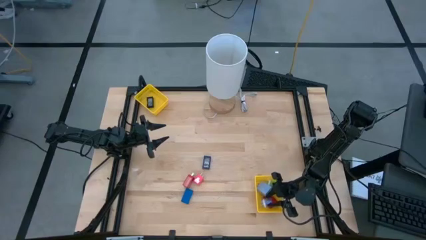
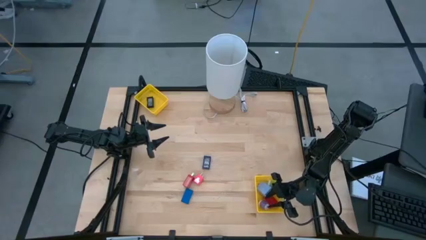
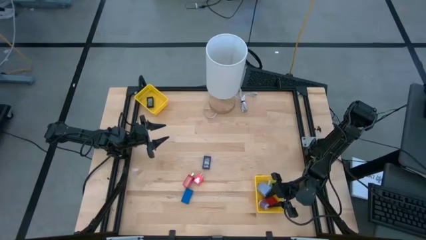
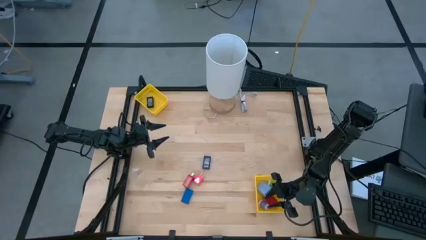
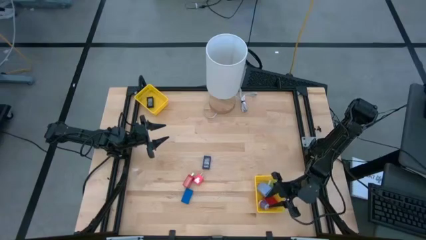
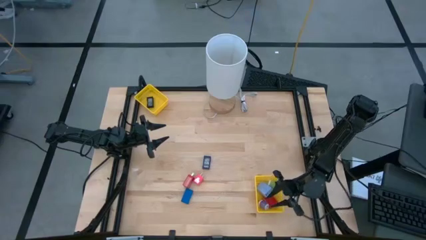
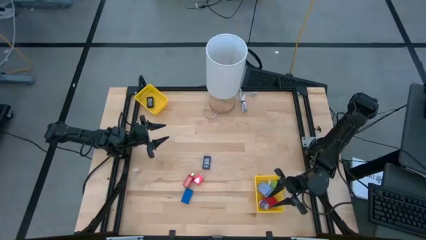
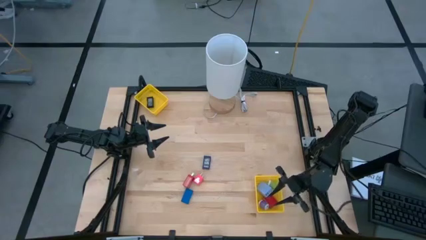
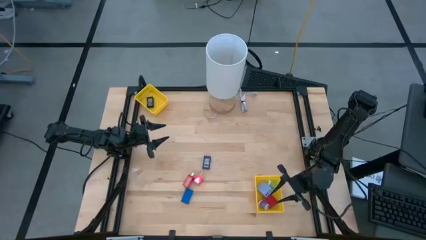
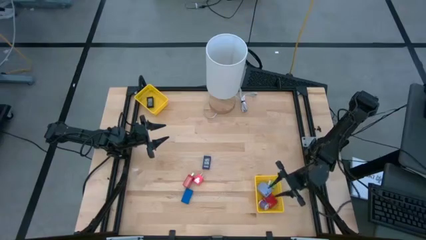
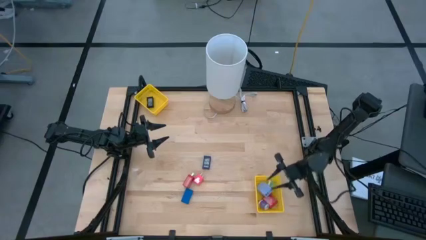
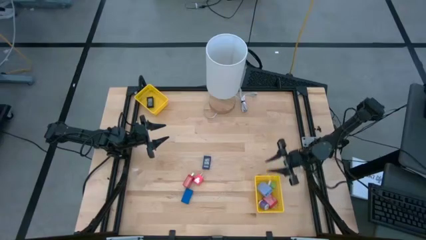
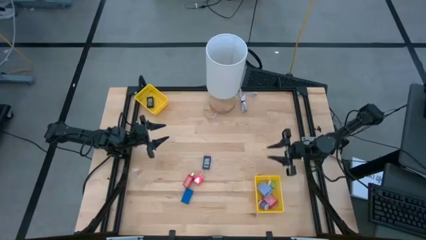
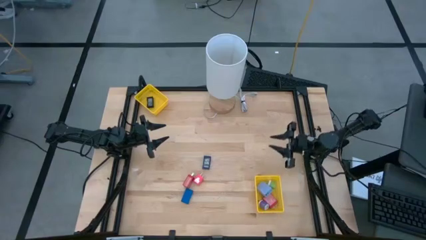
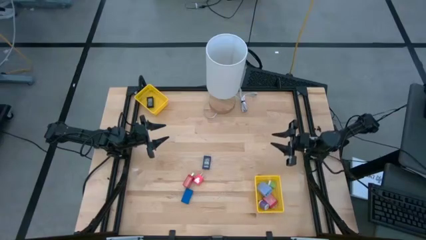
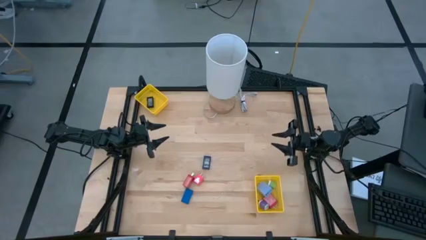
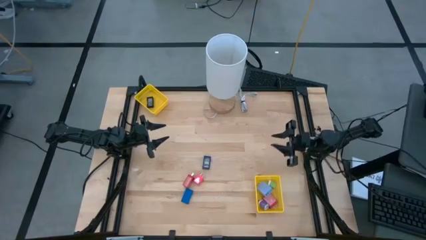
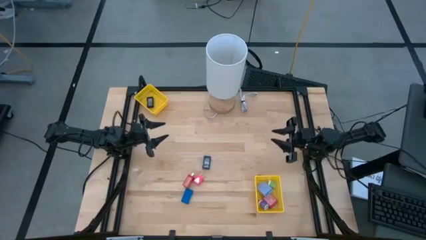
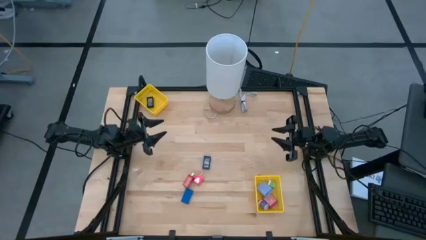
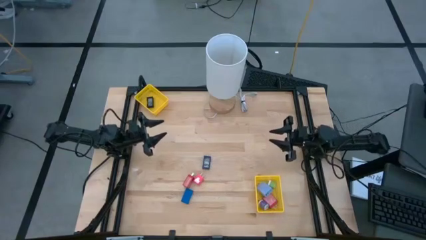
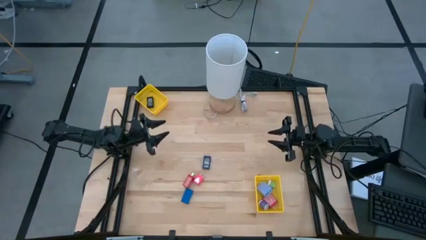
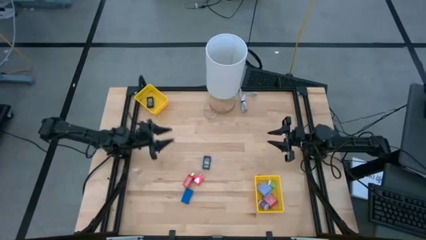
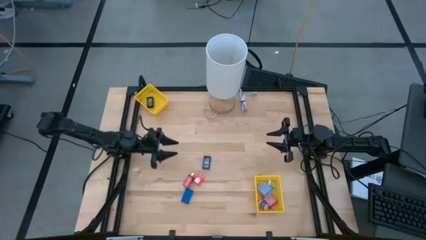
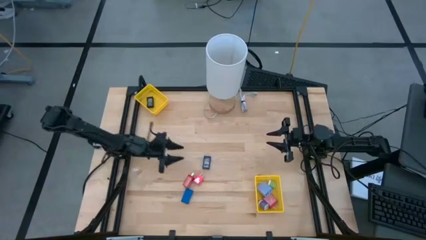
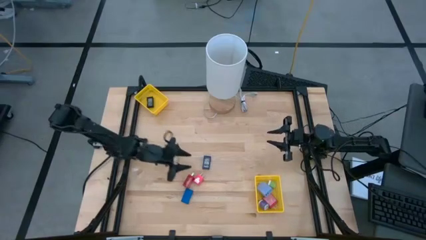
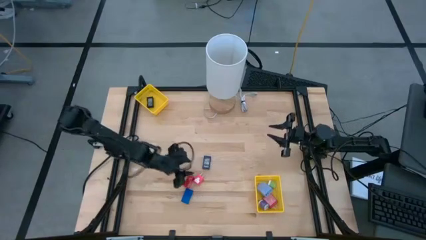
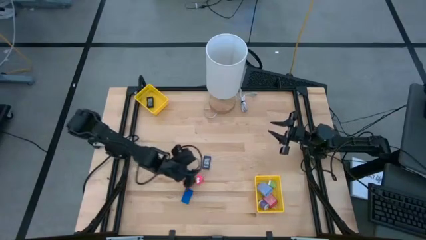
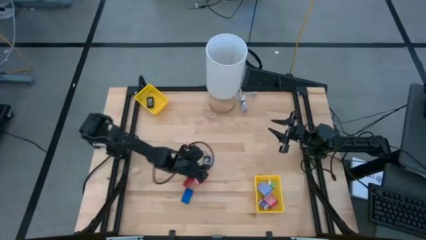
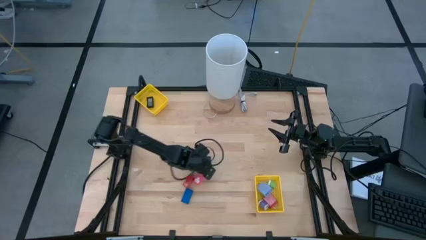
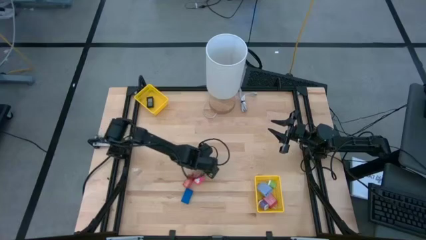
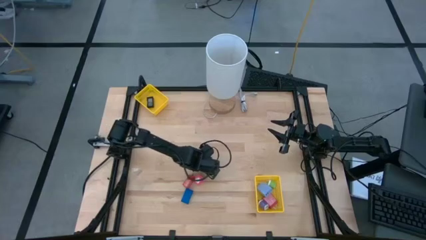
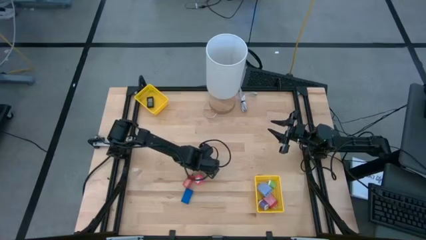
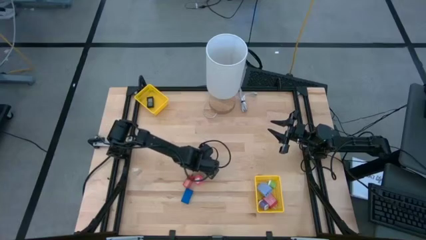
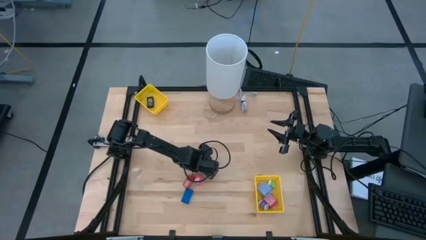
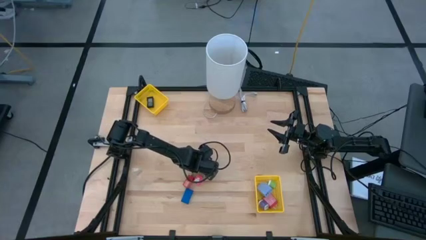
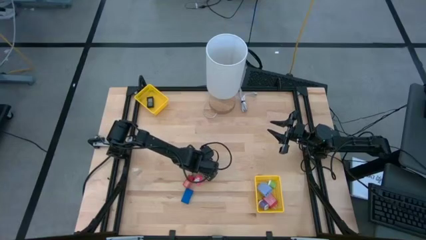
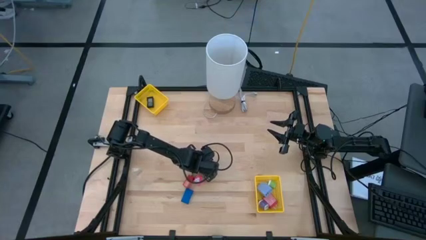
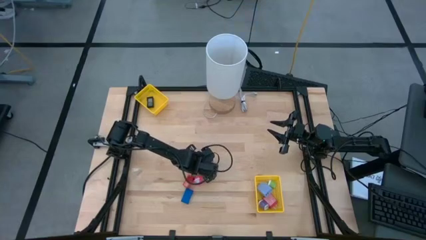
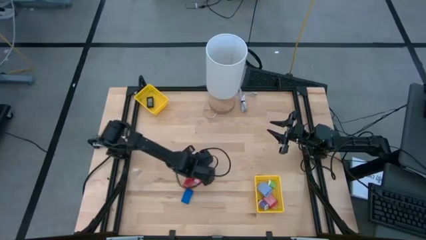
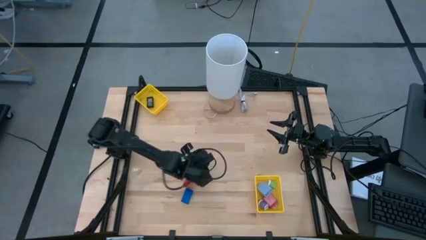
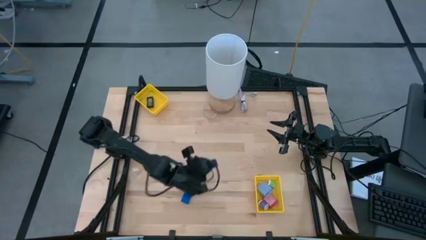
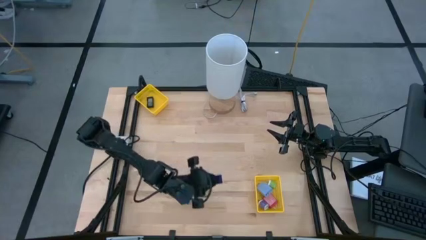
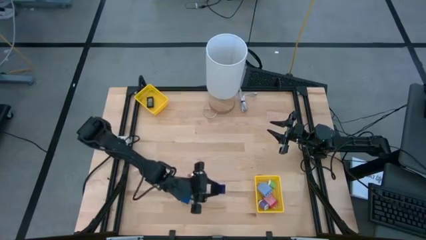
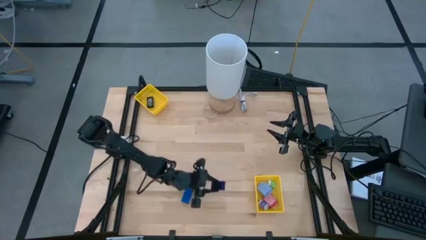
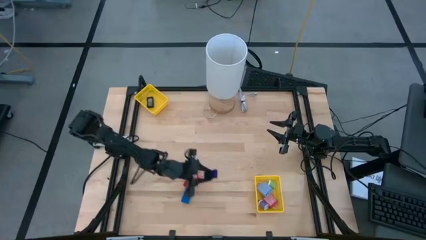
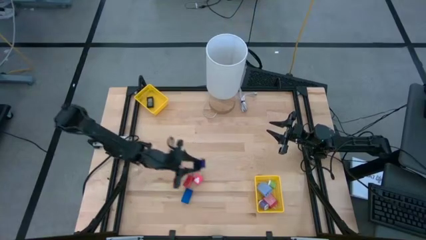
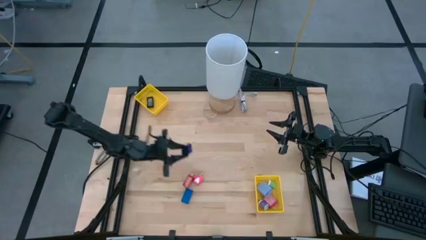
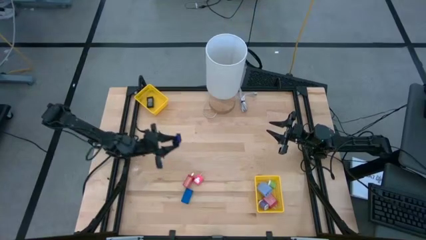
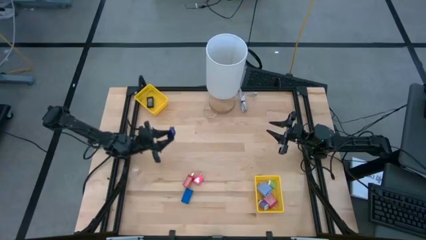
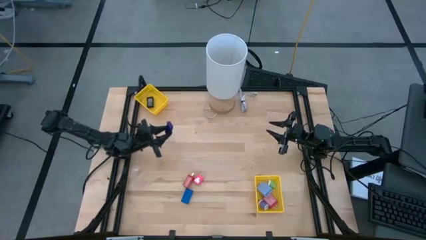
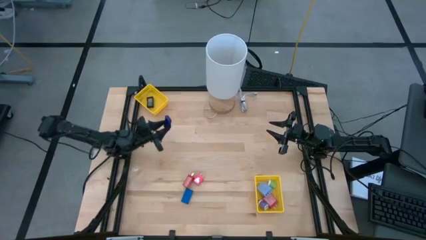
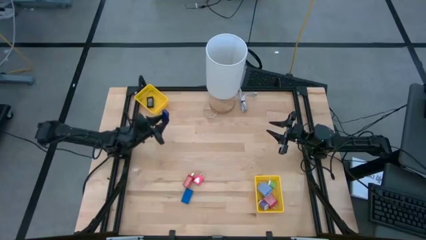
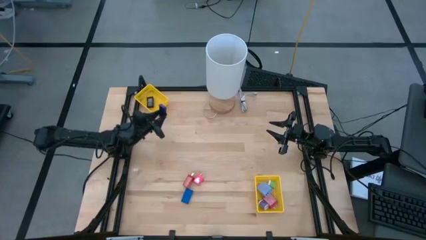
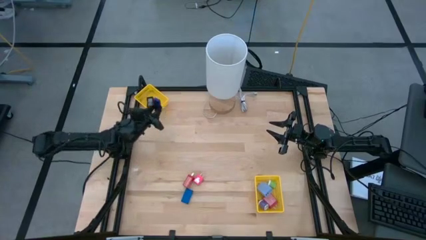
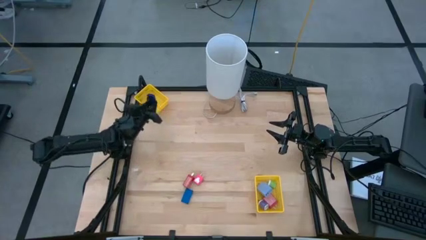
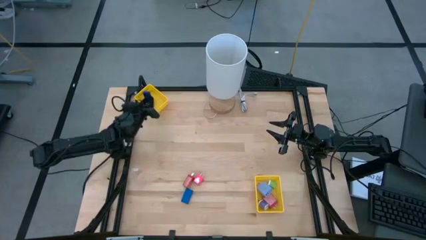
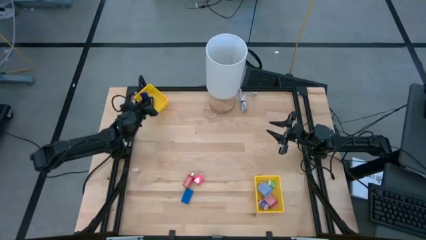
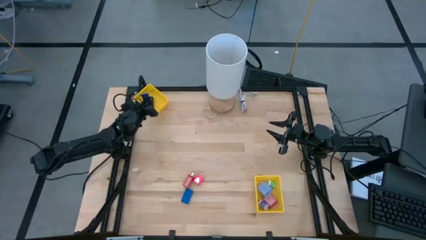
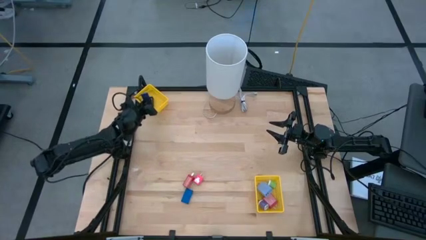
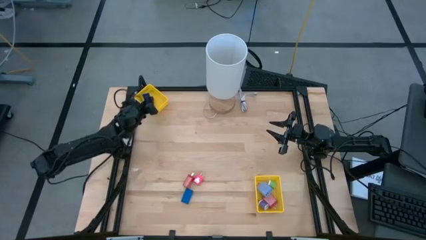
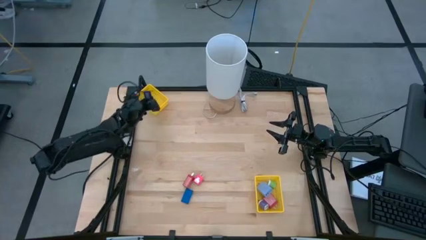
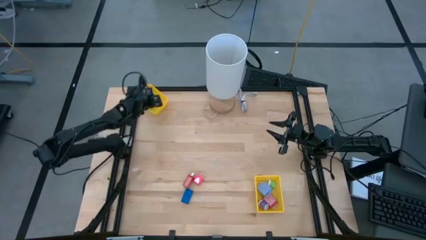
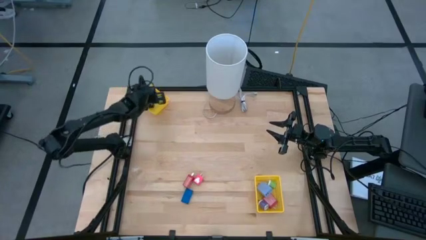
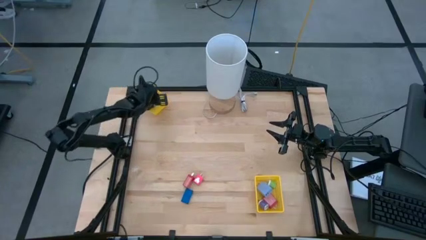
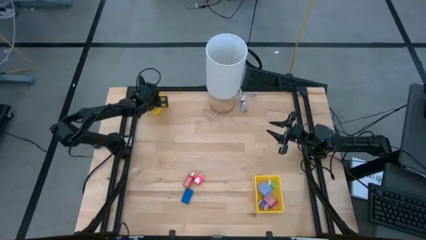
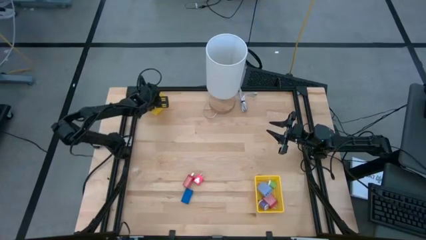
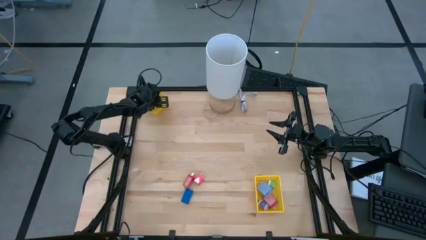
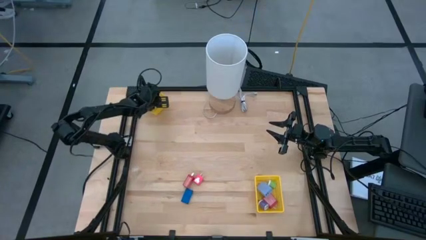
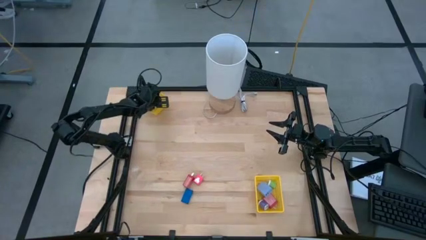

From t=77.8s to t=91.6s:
Task: Pick & Place Office items
Put the dark blue digital timer into the top yellow bin
